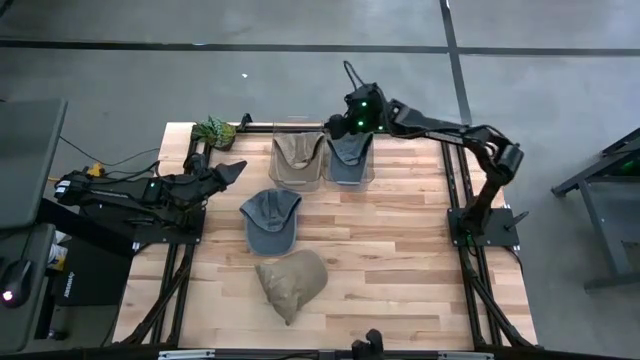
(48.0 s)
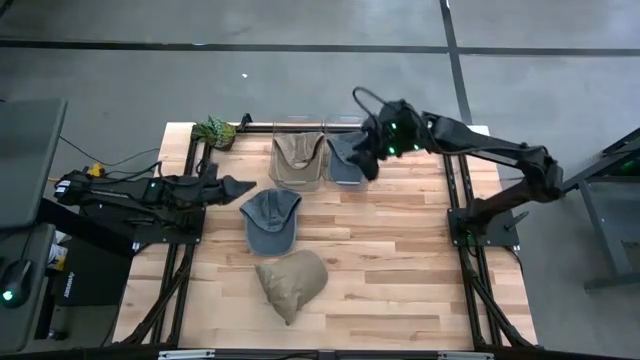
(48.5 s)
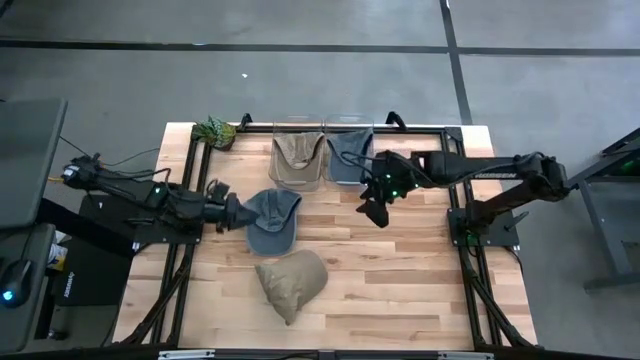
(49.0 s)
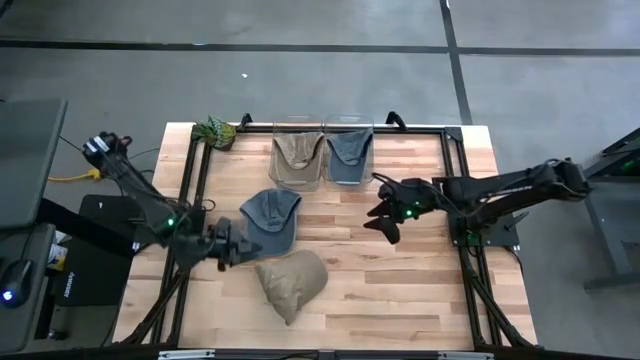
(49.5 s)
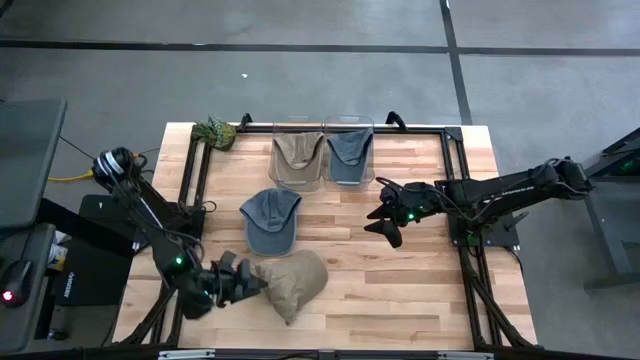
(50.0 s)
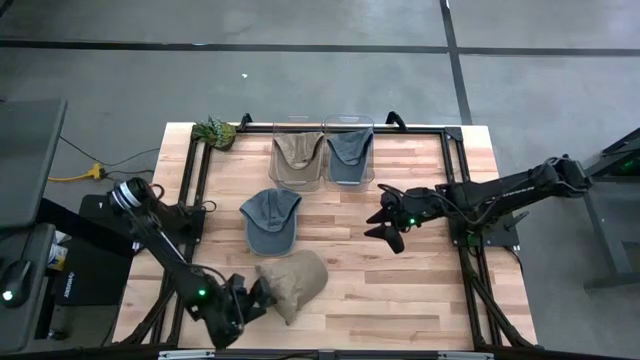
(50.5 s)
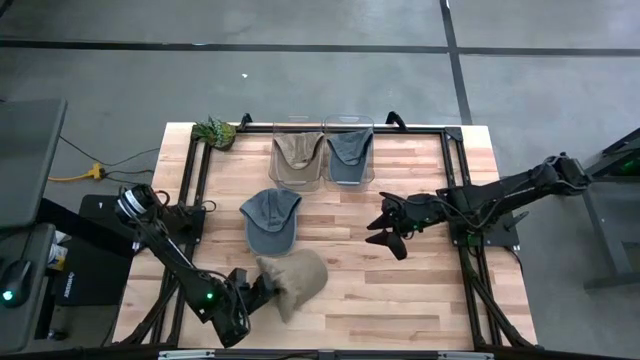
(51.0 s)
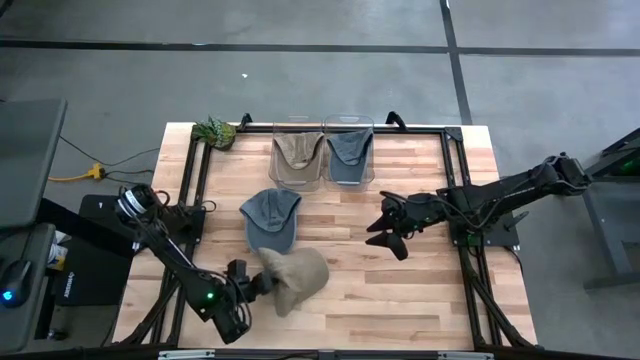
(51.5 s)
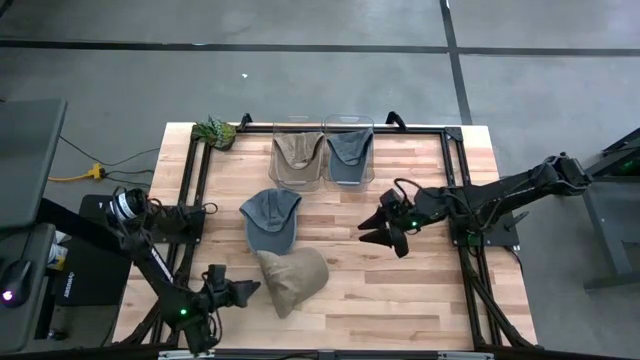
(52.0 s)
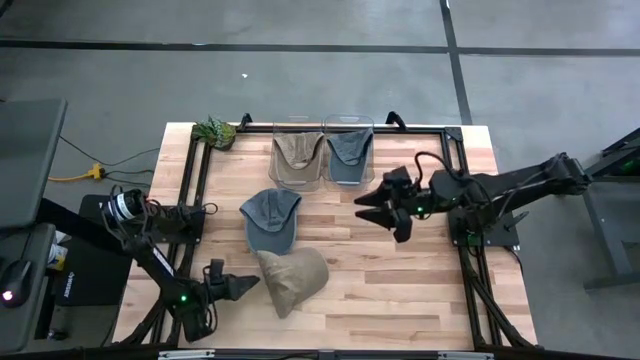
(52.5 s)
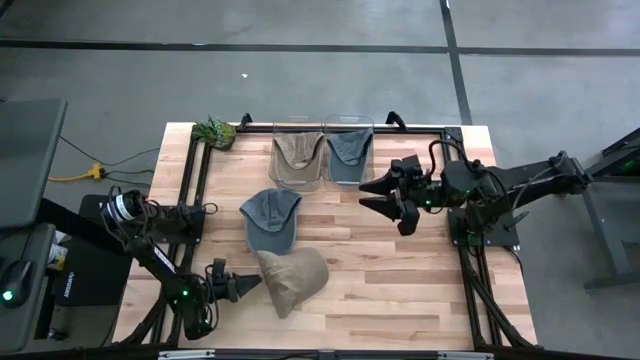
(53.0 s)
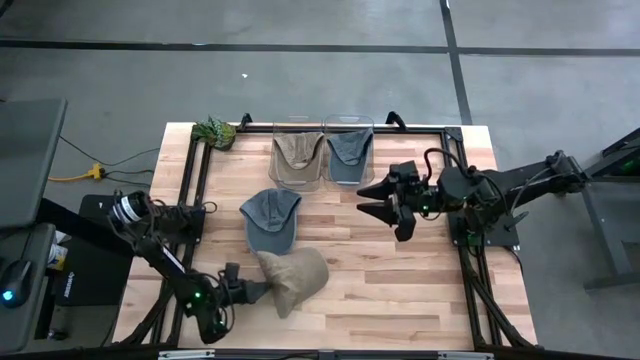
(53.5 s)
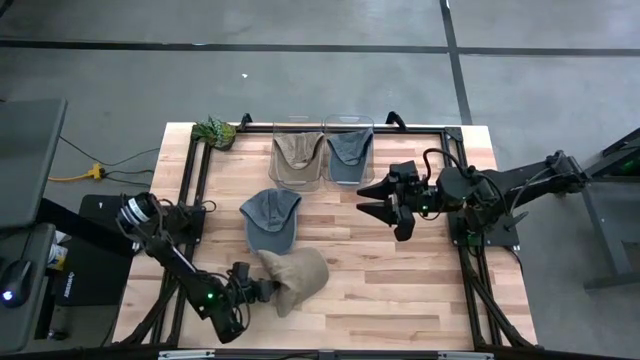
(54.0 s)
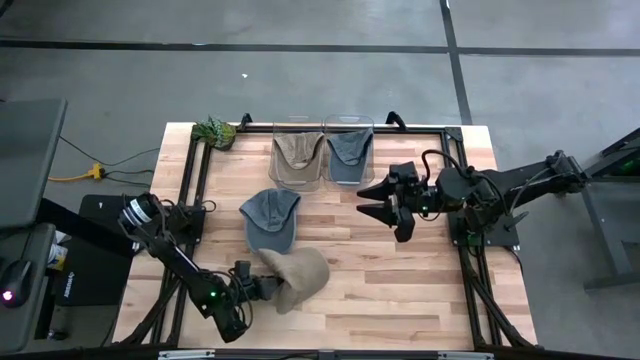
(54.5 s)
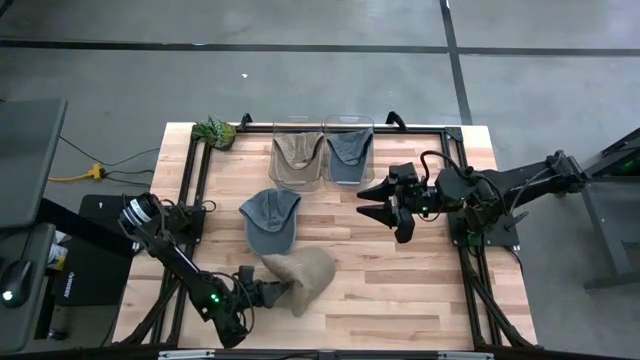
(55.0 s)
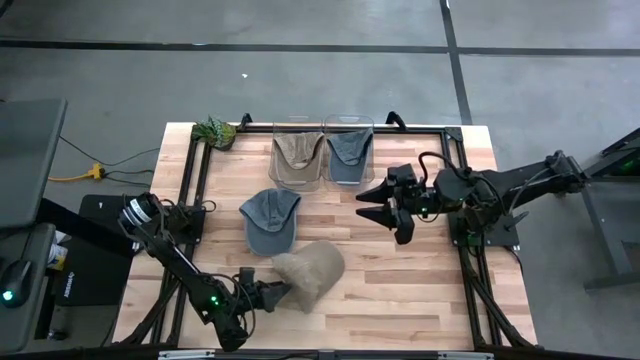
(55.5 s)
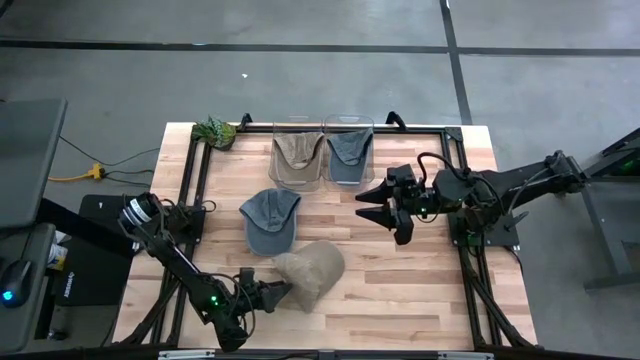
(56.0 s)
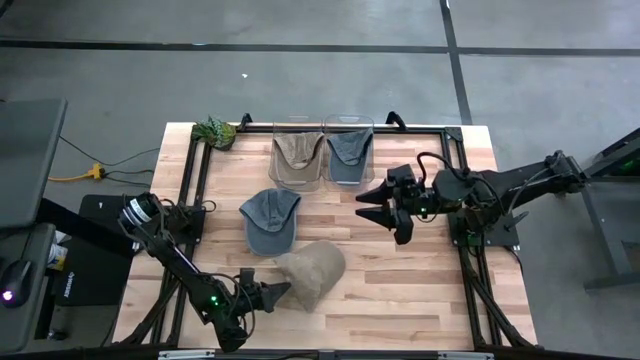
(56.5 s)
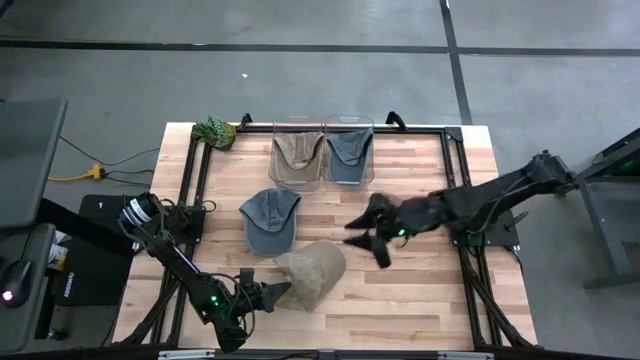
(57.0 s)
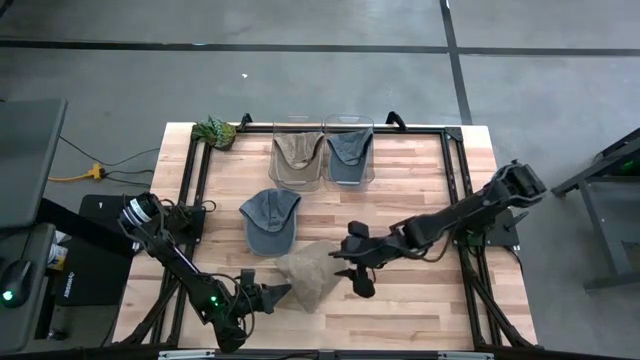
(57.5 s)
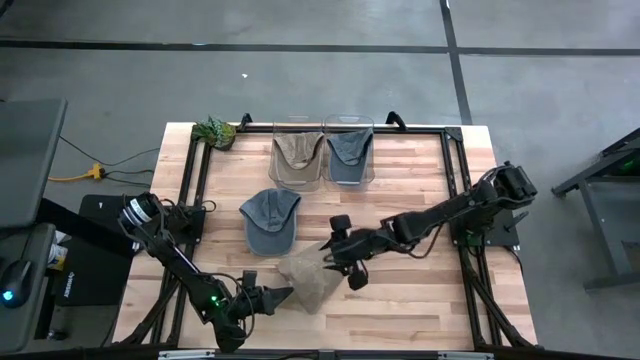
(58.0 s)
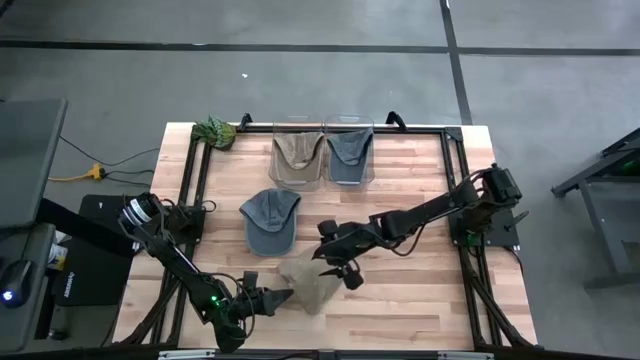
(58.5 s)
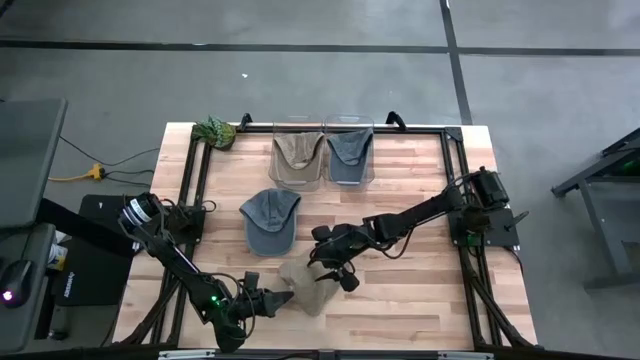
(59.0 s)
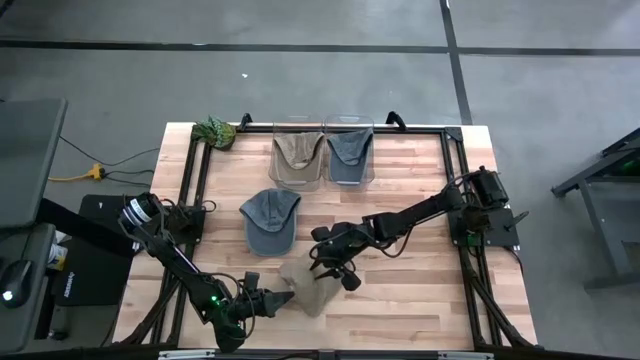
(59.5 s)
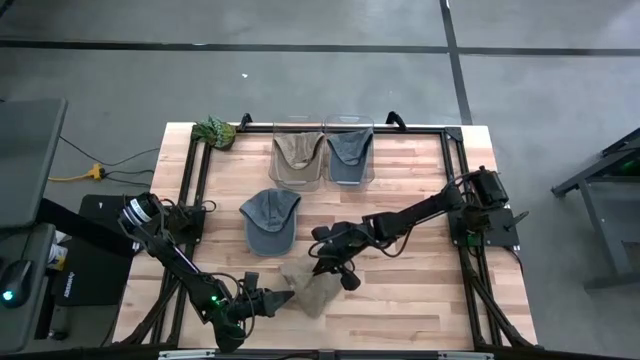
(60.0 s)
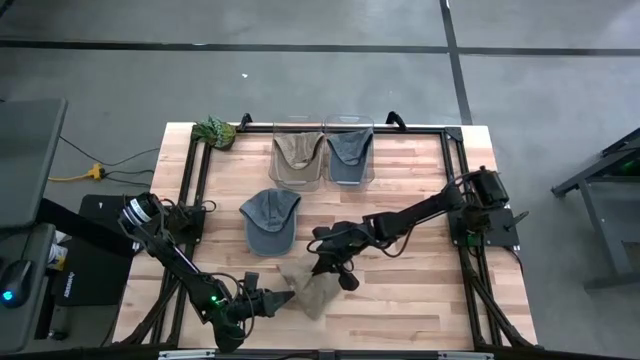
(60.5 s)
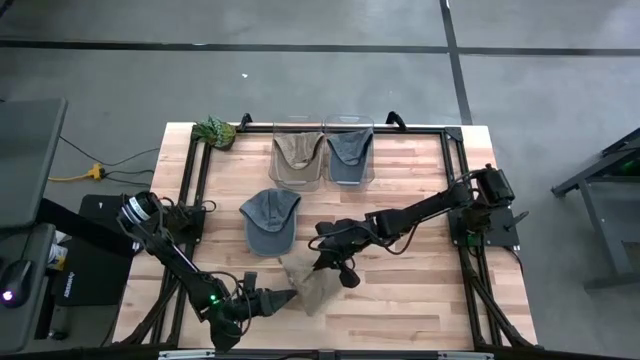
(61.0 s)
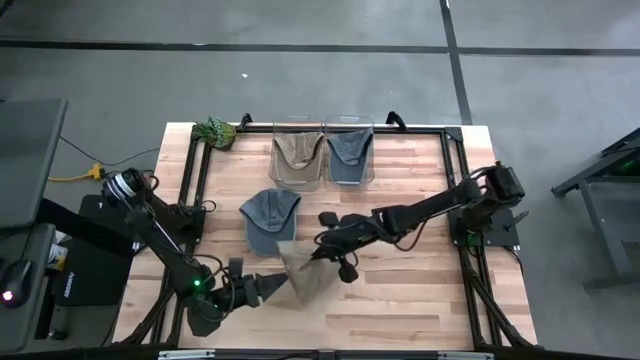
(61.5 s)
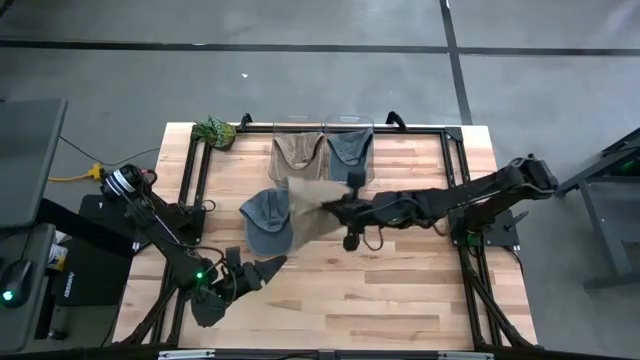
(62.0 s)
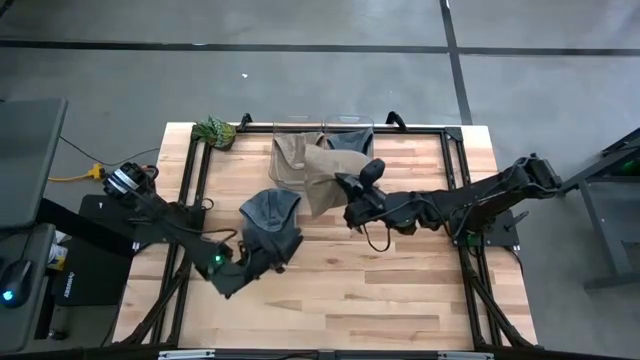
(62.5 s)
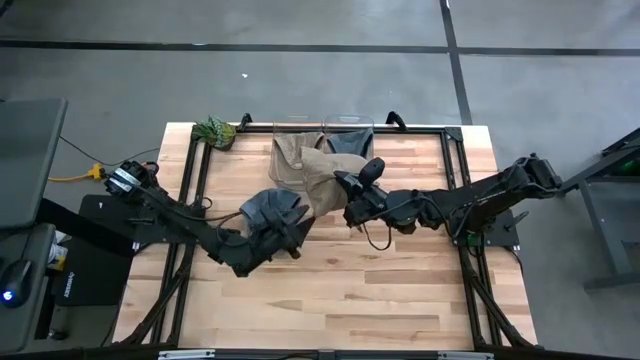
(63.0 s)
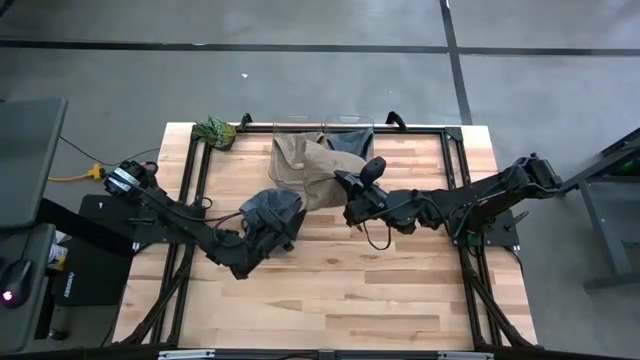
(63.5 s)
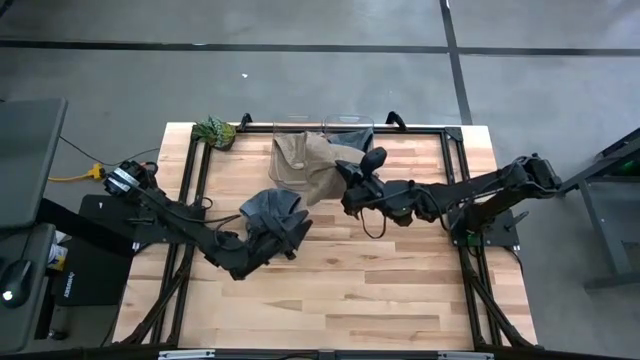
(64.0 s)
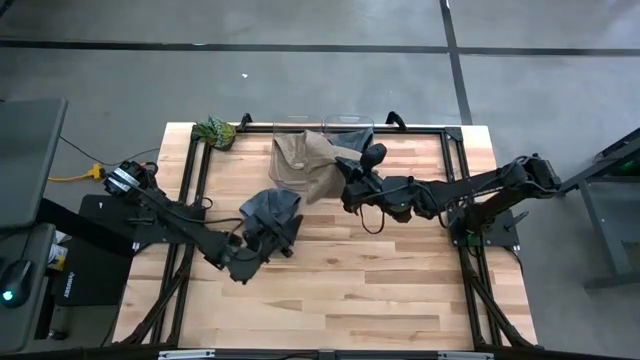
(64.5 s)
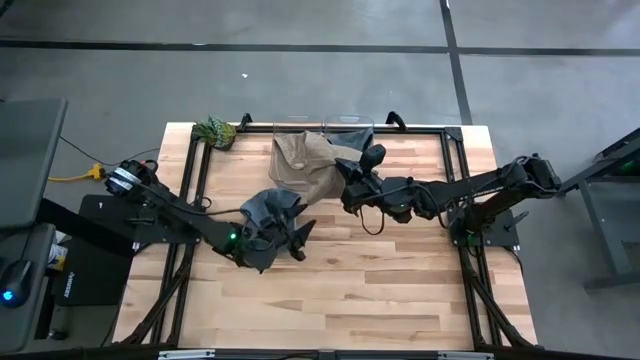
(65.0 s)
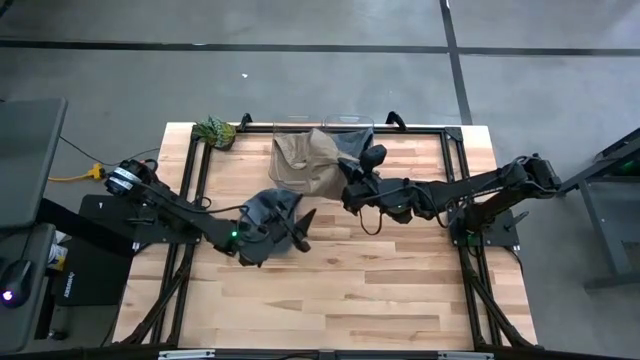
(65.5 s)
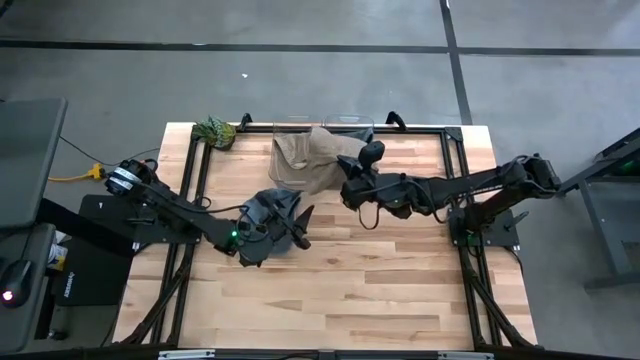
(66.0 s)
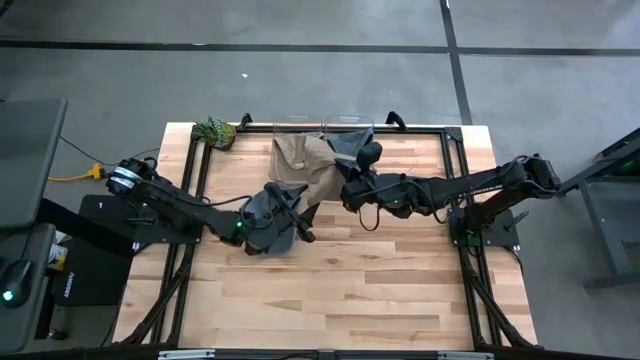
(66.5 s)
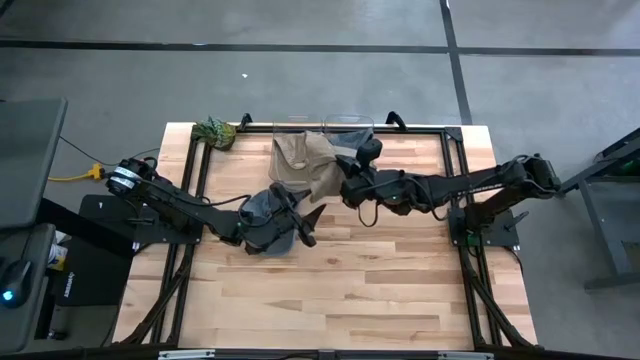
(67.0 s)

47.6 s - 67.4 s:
Task: Pick & Place hat
Put the brown cap into the left transparent bin

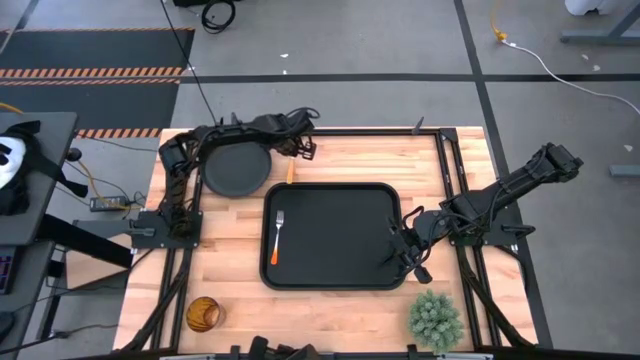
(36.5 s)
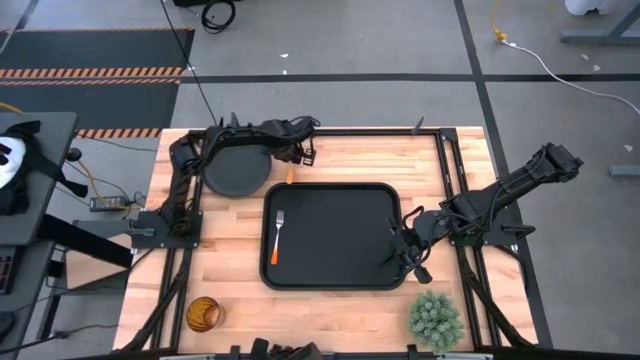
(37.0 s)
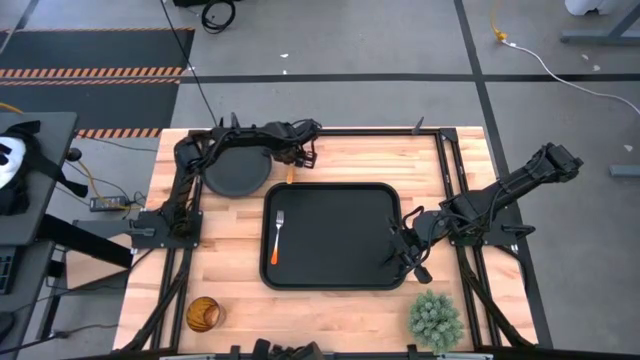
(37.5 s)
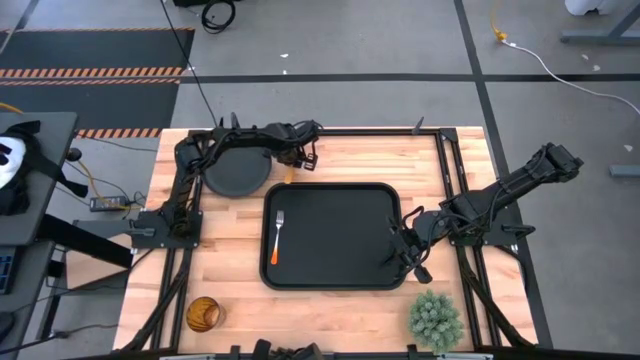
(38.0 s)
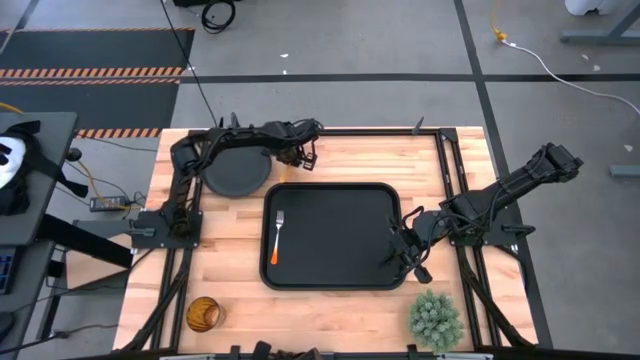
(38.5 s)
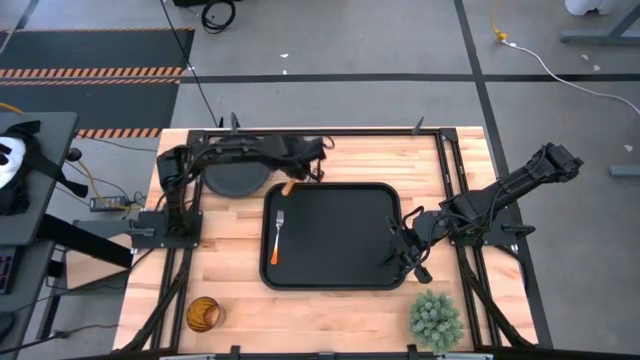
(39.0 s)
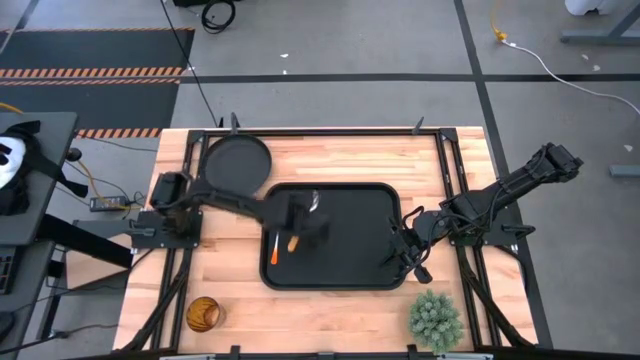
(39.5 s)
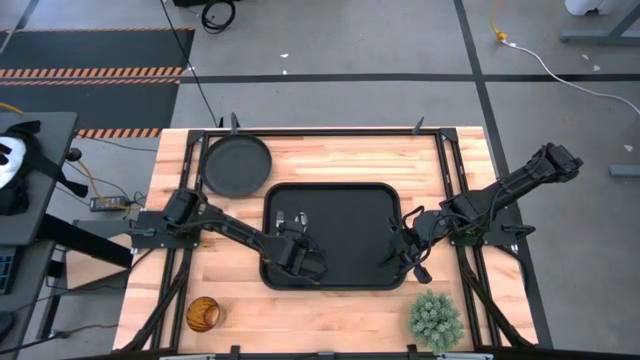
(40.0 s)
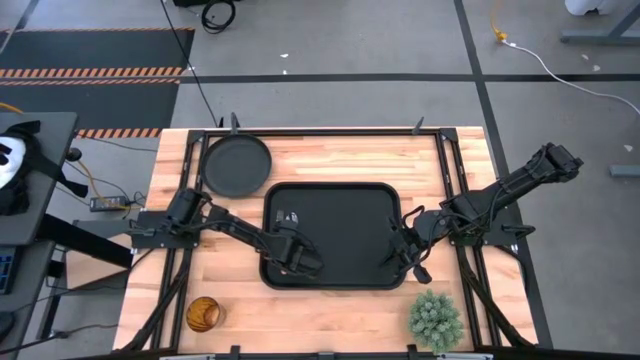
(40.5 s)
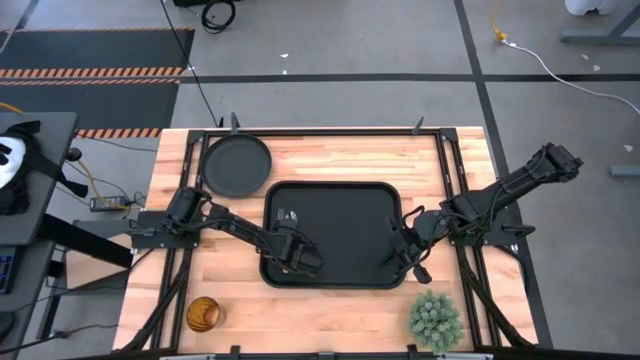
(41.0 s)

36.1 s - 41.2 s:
Task: Pick and place plate/cup/fork/spoon on tray
Put the yellow spoon on the black tray to the right of the orange fork
